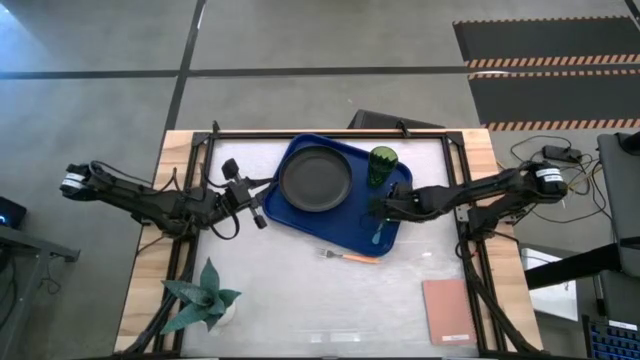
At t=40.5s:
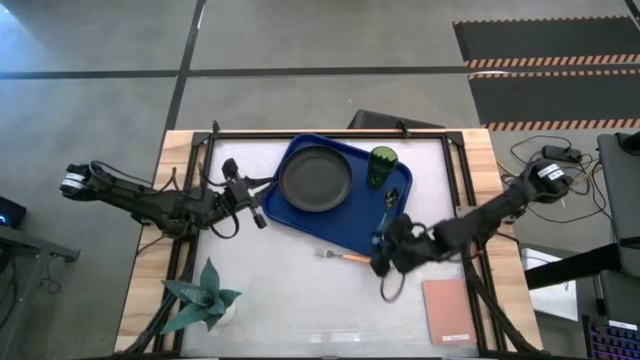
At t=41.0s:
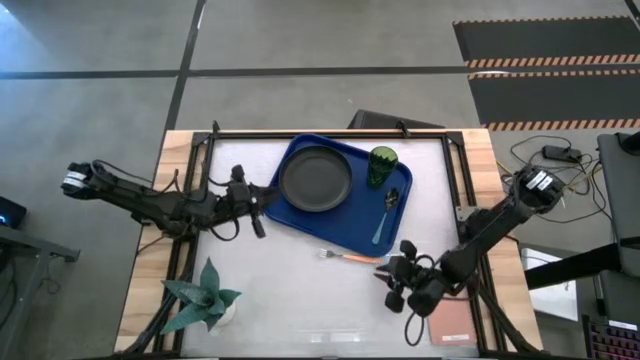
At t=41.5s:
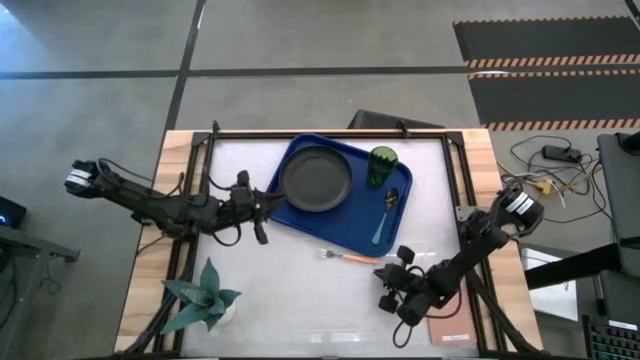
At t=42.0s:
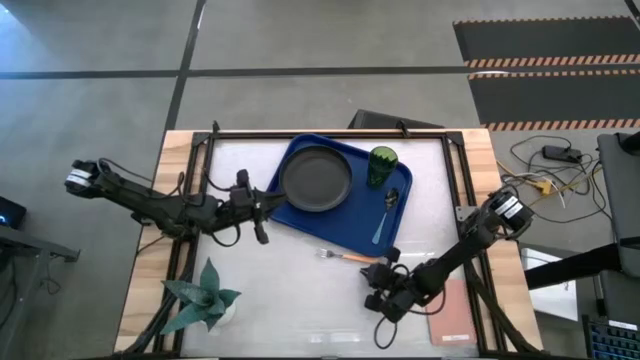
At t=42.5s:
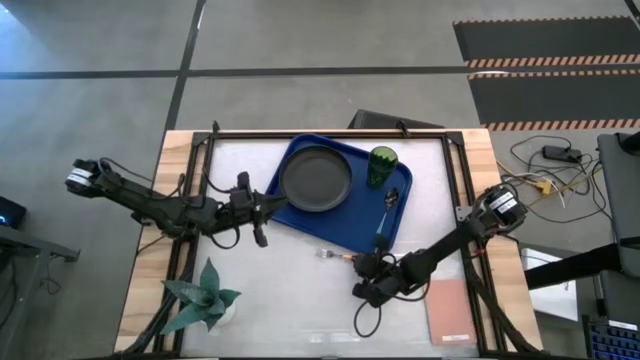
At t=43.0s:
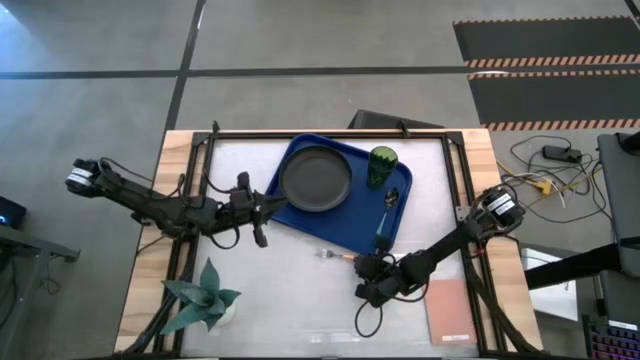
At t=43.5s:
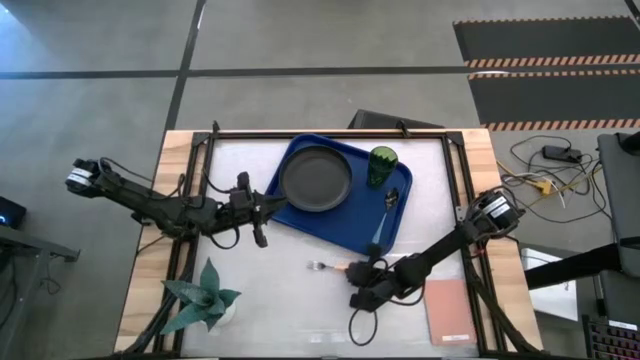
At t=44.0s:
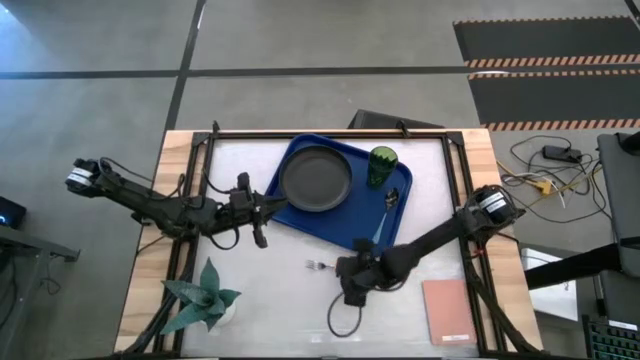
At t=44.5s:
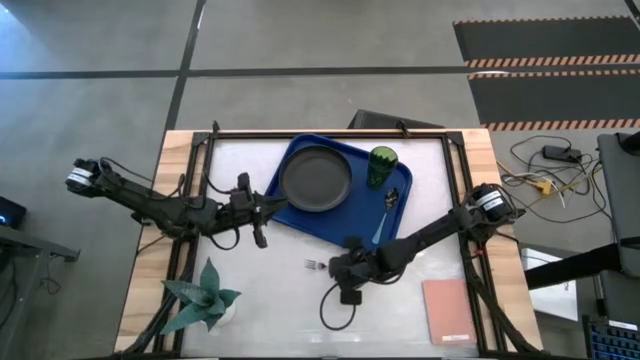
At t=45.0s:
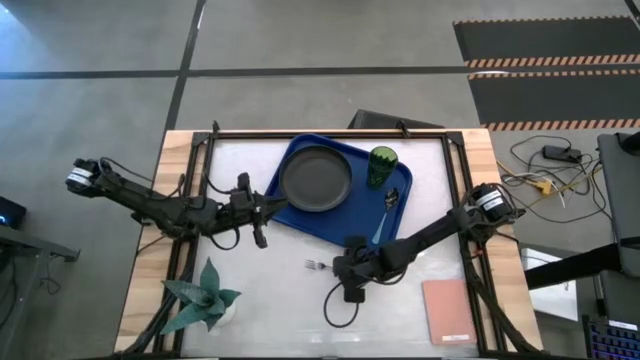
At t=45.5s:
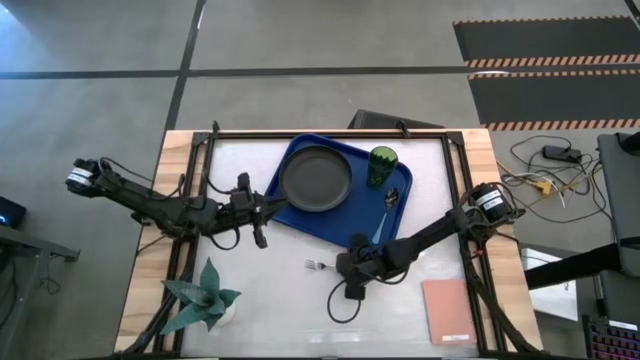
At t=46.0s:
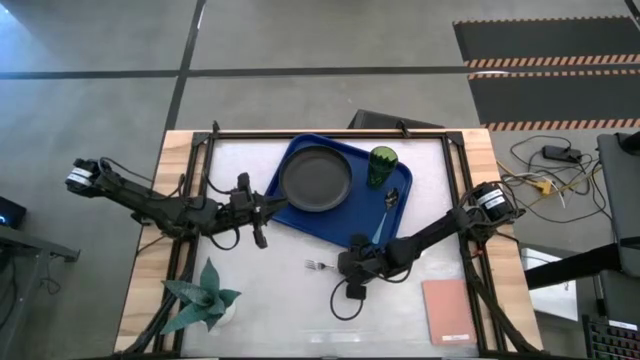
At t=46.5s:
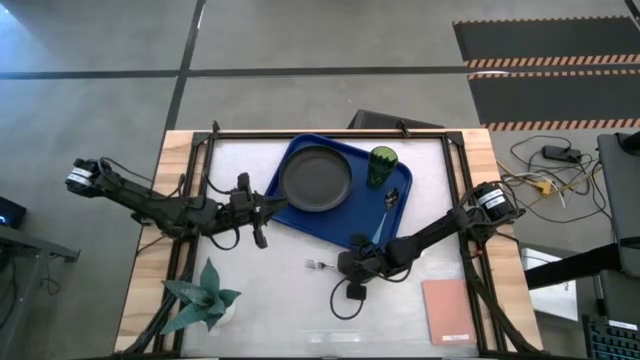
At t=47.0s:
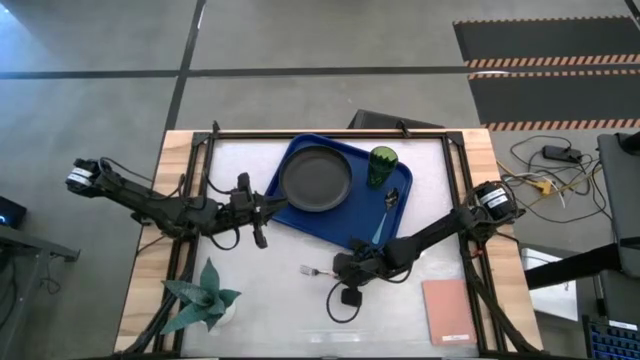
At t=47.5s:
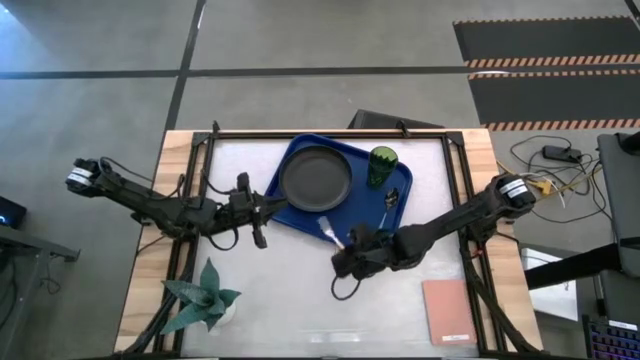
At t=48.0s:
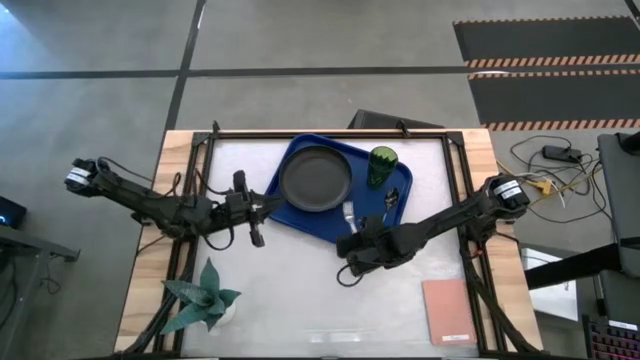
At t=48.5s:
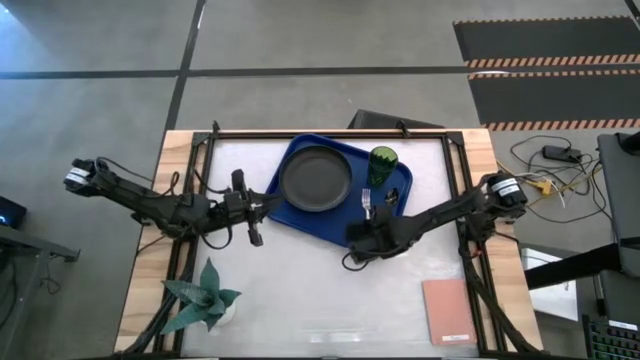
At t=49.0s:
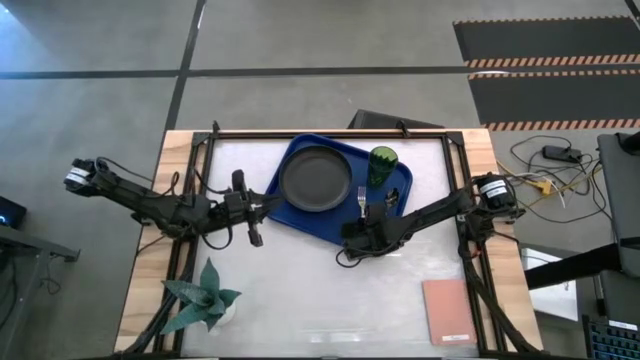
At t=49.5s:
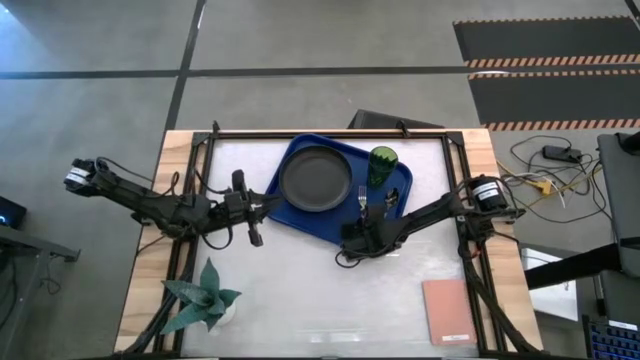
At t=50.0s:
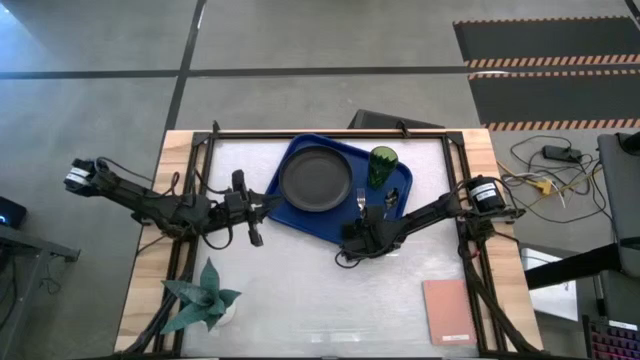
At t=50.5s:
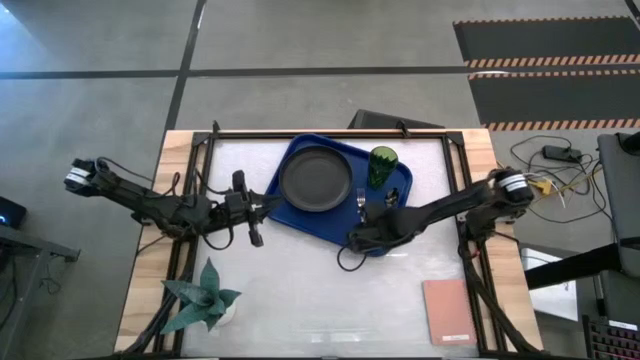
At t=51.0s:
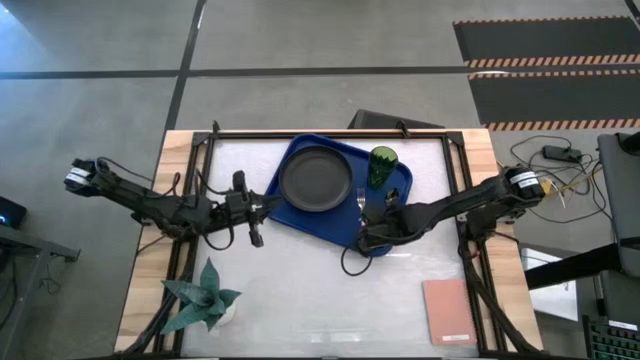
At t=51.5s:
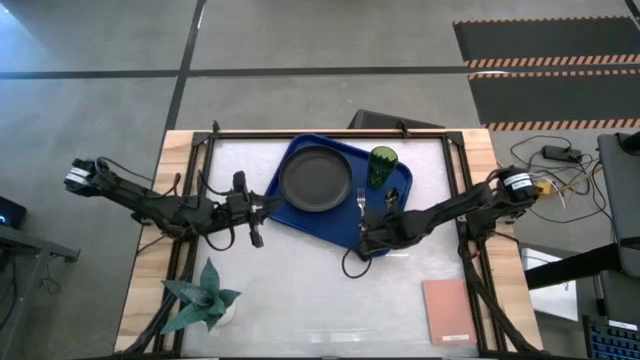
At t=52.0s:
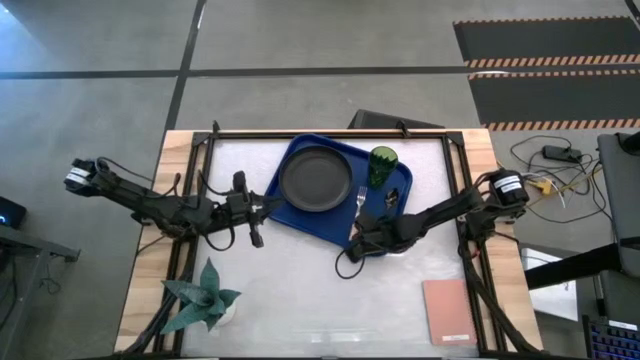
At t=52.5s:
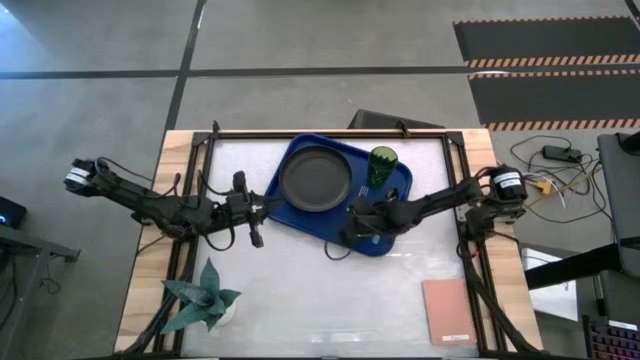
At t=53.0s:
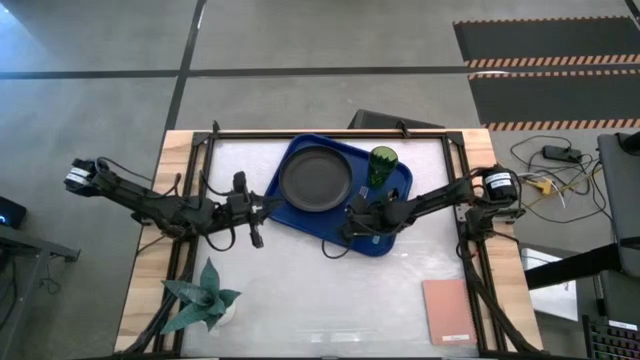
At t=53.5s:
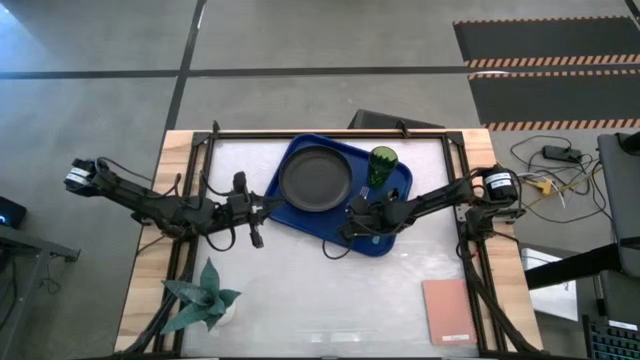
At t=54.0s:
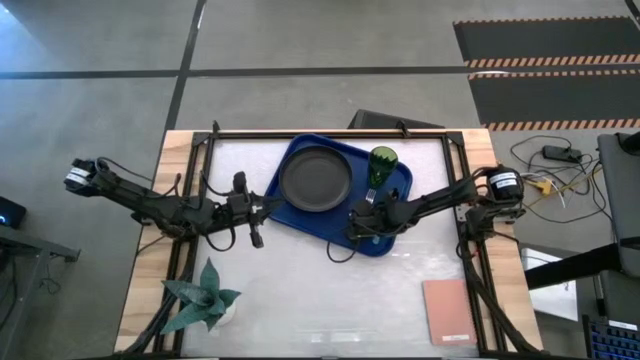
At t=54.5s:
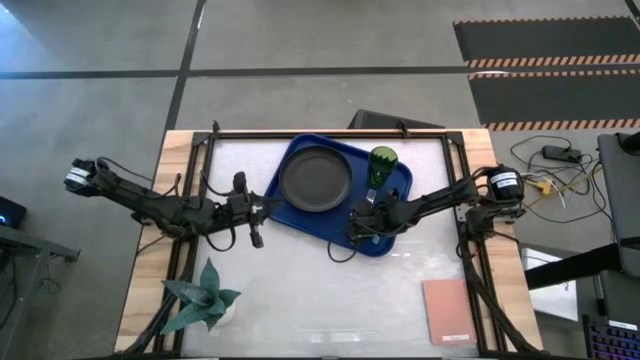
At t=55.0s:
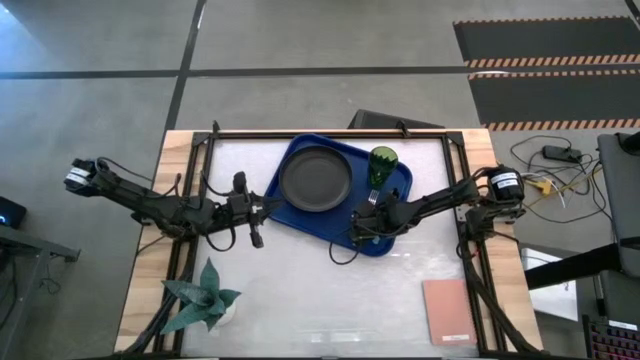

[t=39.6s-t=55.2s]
Task: Pick and place plate/cup/fork/spoon on tray
Put the orange fork on the blue tray to the left of the blue spoon

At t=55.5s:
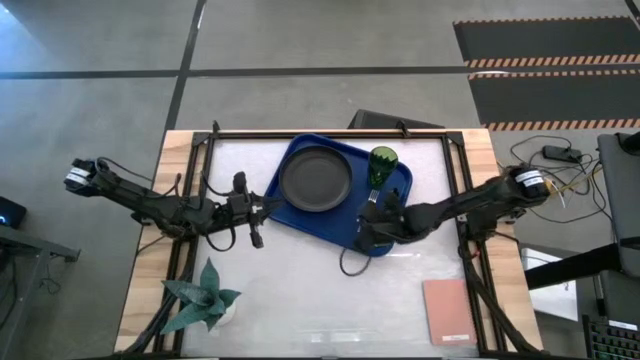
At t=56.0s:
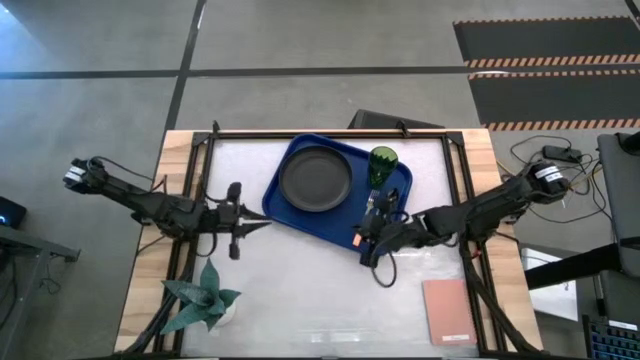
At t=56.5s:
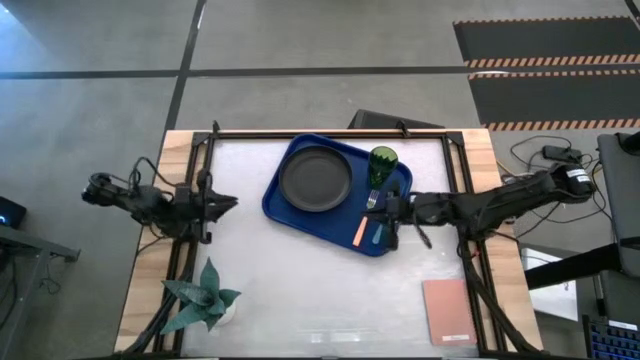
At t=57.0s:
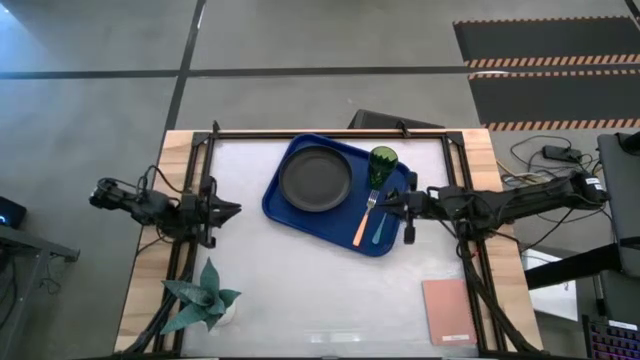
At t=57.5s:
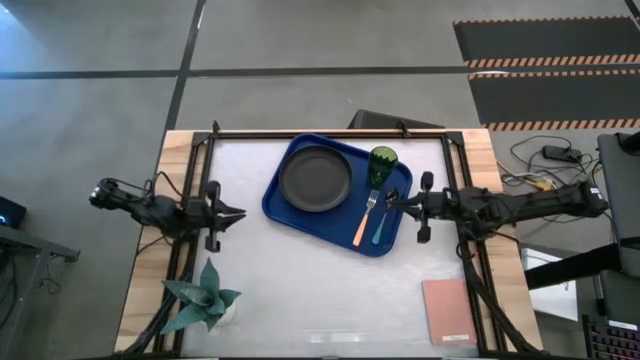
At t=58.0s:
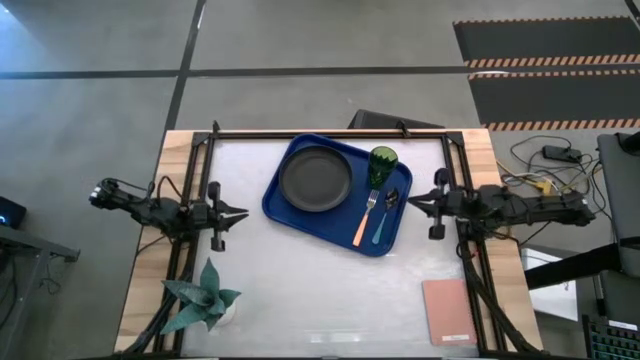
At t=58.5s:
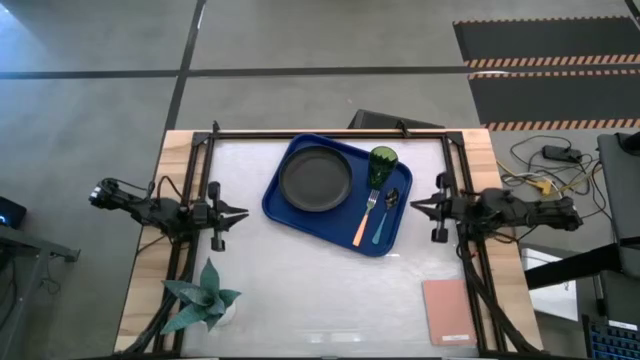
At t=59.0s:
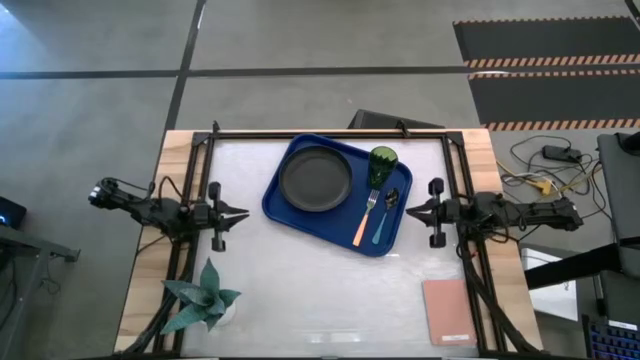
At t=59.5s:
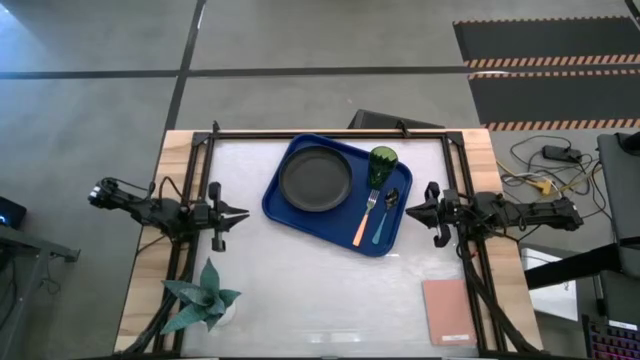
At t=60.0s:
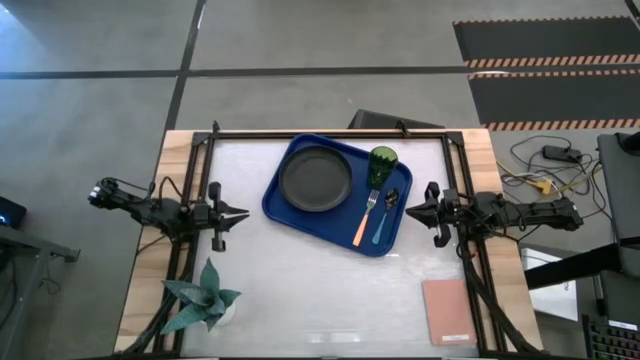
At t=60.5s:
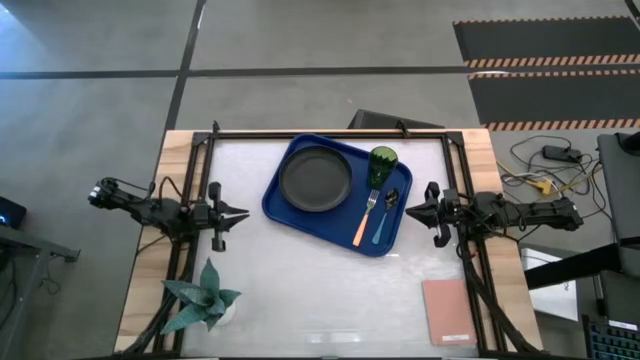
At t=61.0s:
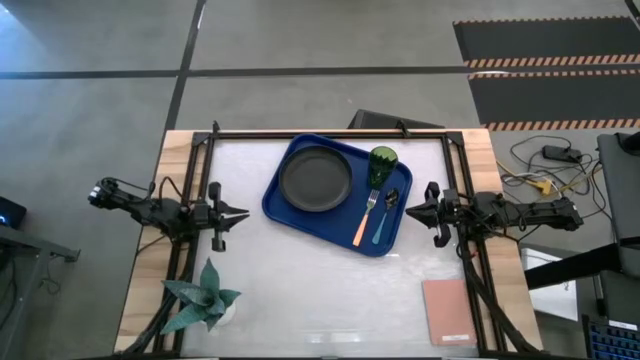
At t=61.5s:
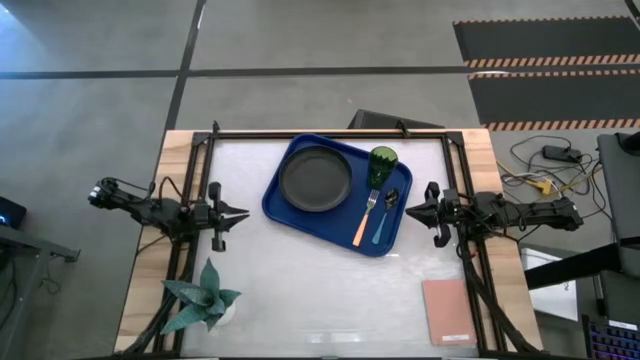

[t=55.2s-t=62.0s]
Return to Home Position
